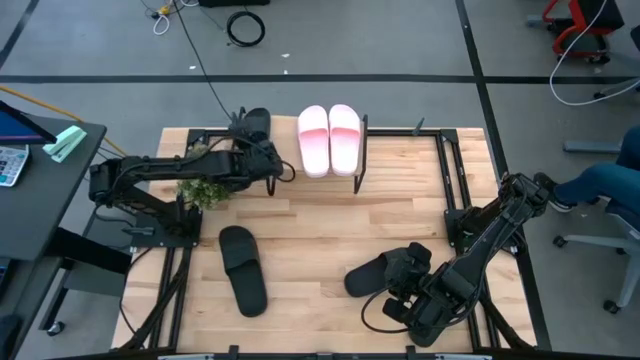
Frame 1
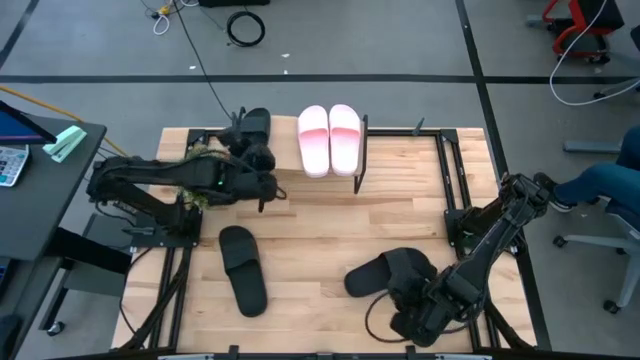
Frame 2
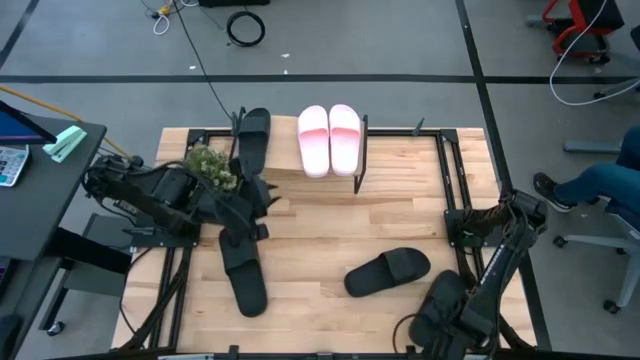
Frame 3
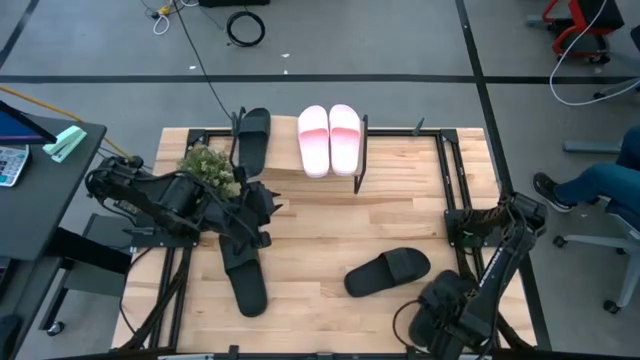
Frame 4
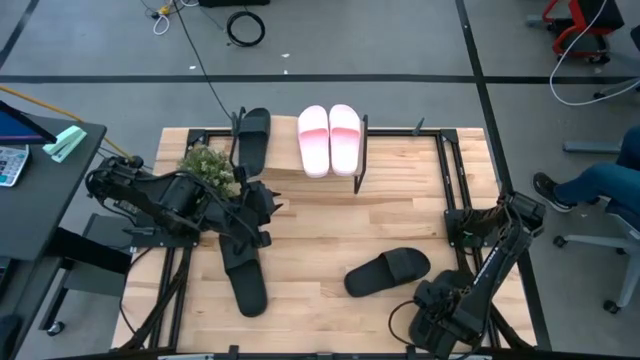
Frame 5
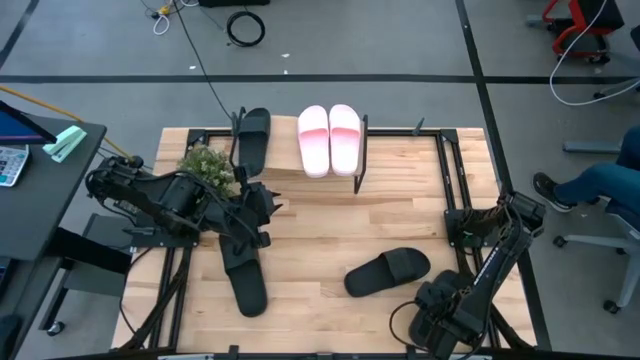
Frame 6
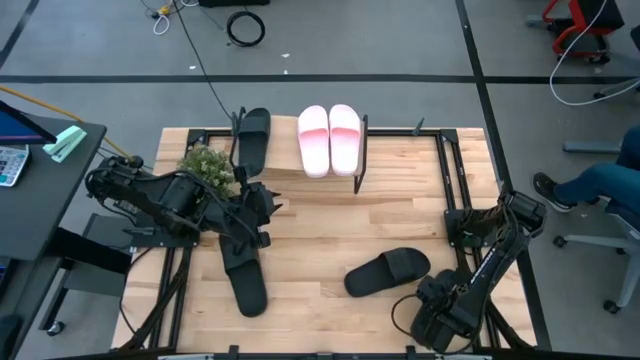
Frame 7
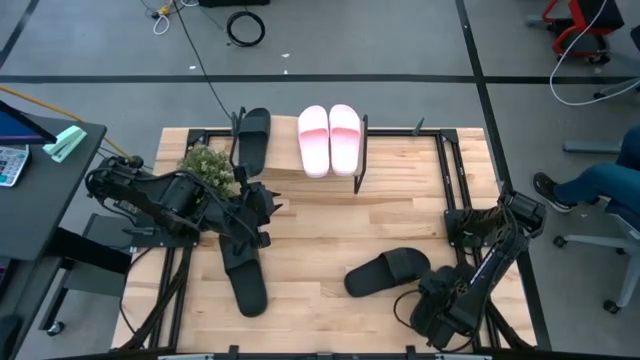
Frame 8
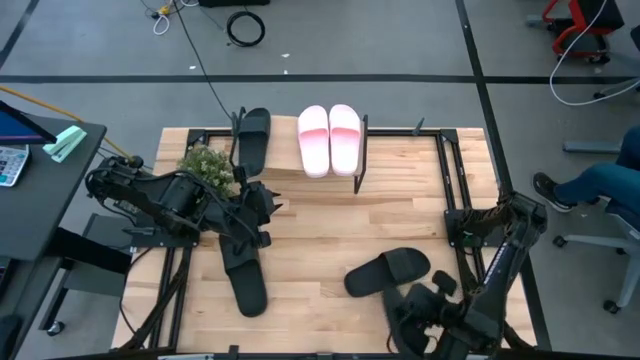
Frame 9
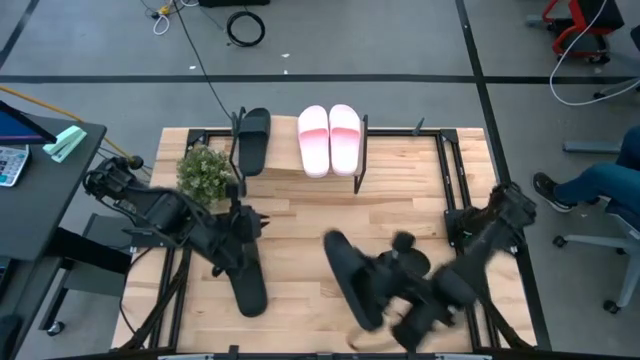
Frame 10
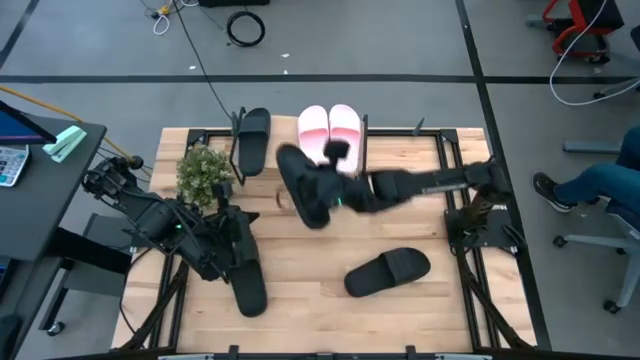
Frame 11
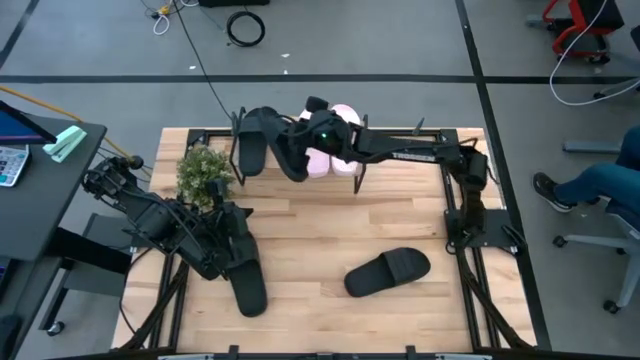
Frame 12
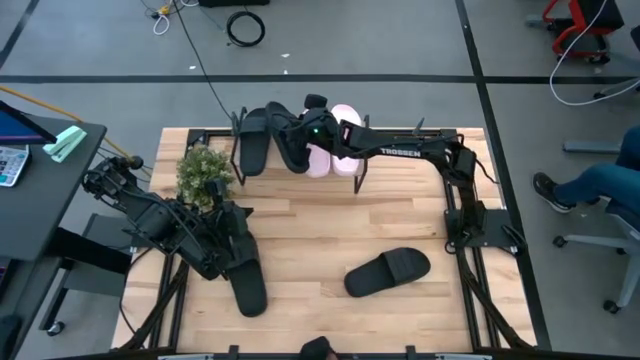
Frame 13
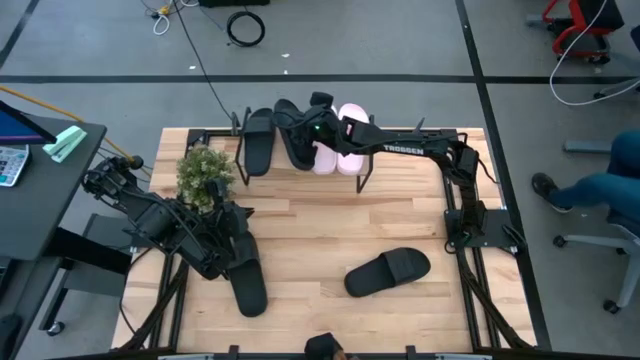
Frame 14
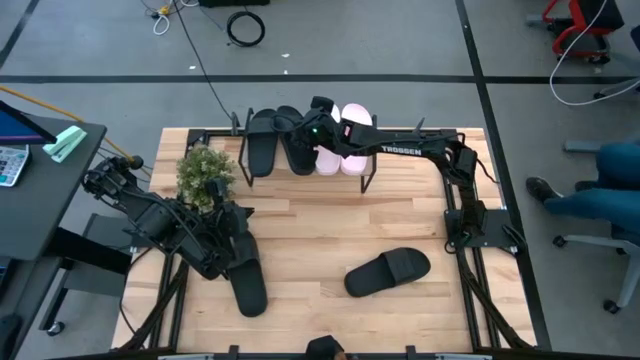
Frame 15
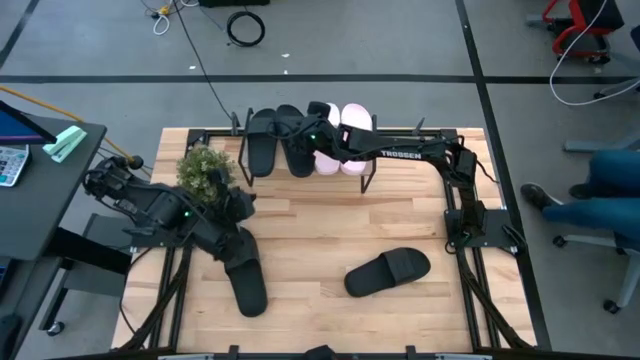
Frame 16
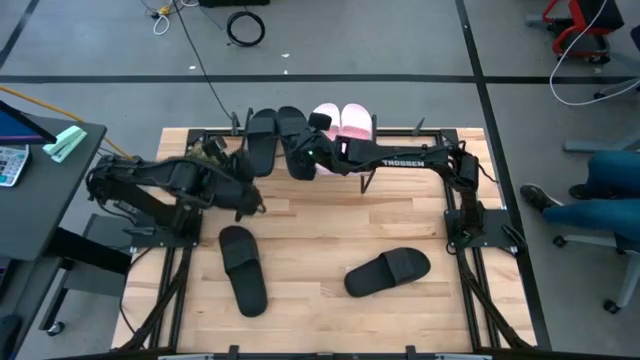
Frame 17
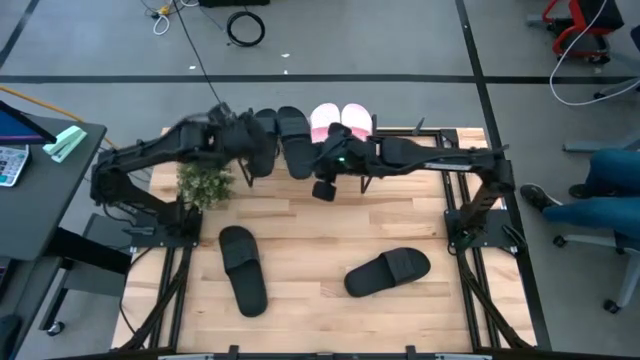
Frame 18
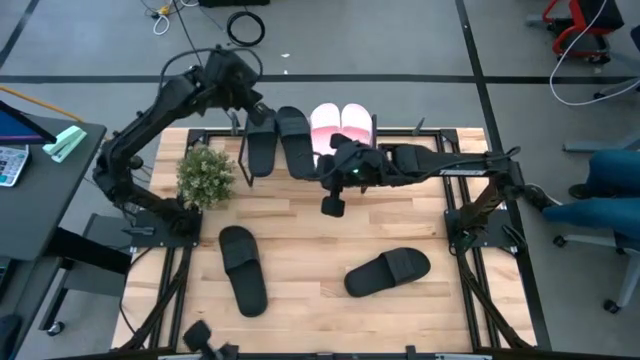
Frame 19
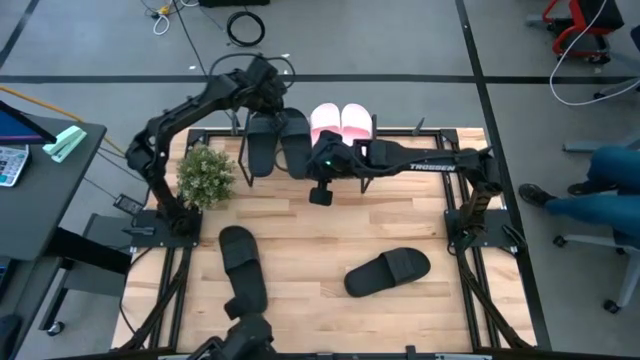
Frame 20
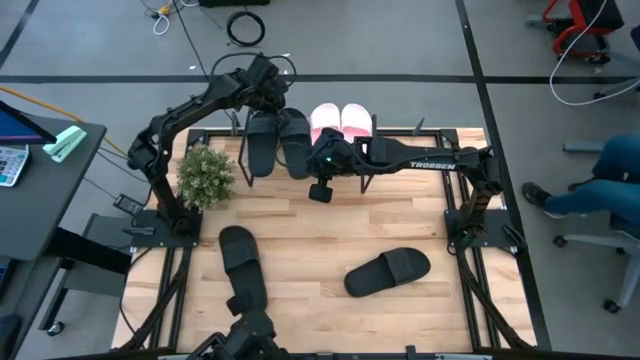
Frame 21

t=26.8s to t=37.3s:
Task: Pick and place slides into the shelf
Put the right black slide on the shelf

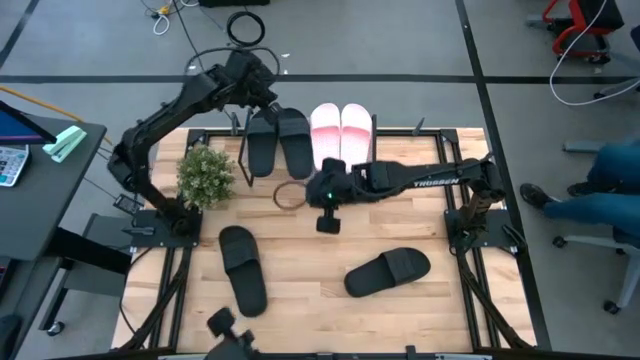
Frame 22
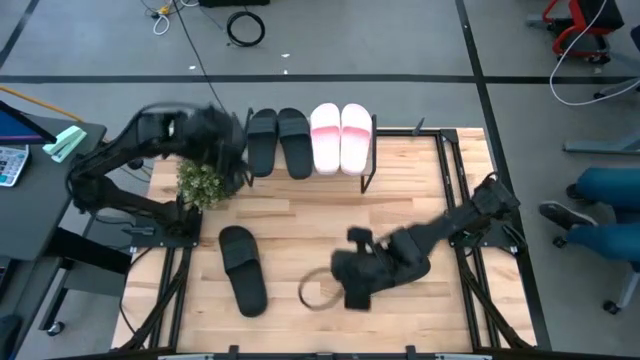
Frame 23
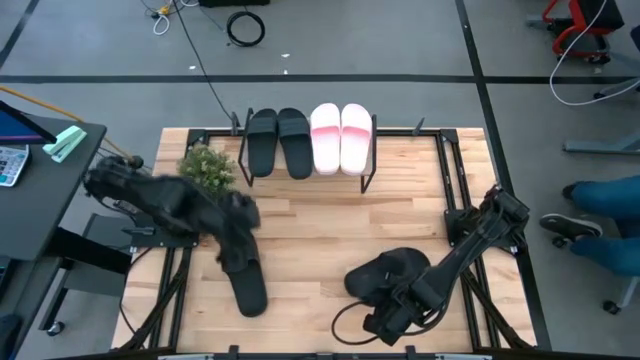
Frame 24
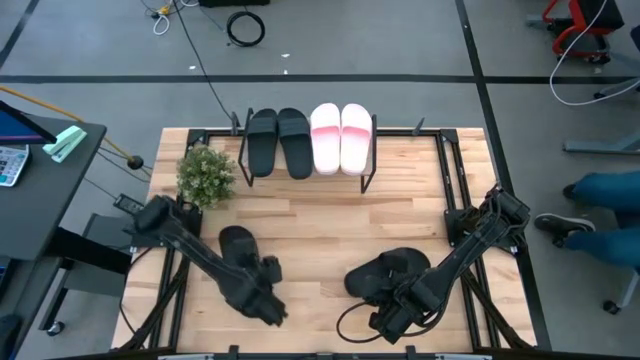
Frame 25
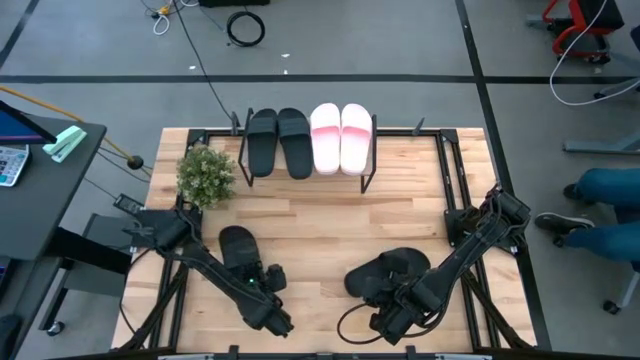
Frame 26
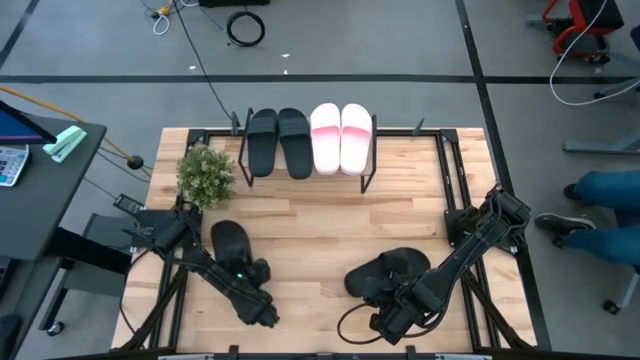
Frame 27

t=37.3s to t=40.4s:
Adjust the left black slide on the table

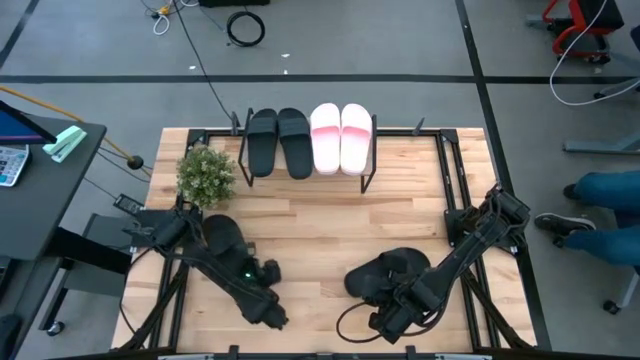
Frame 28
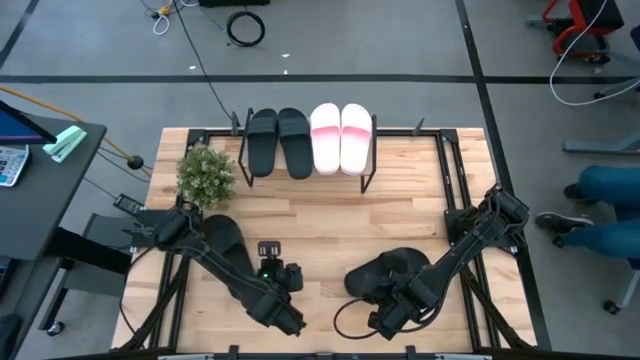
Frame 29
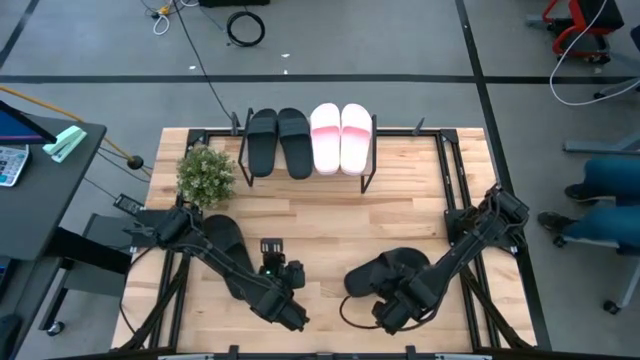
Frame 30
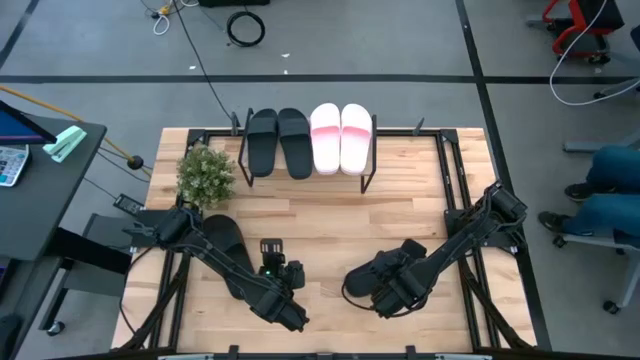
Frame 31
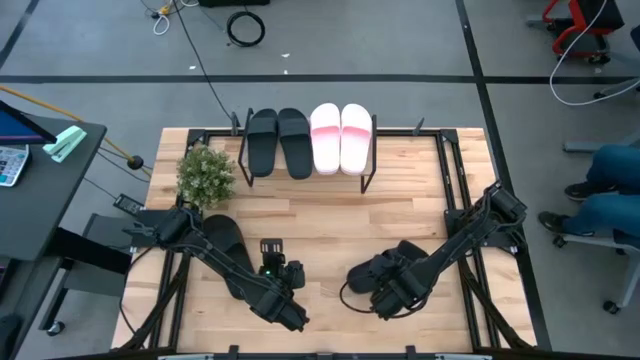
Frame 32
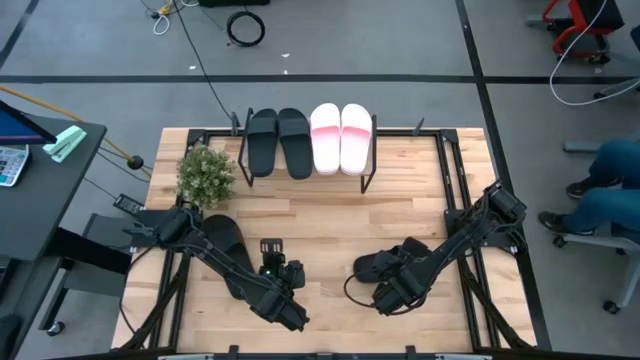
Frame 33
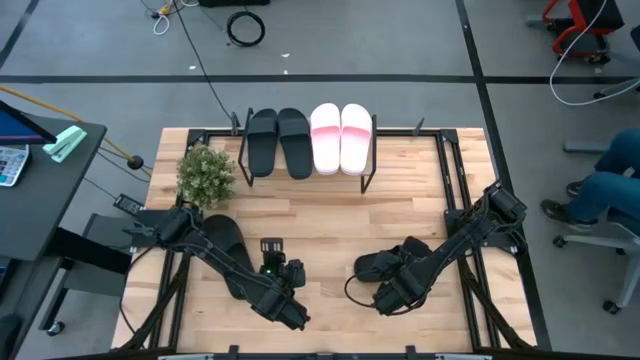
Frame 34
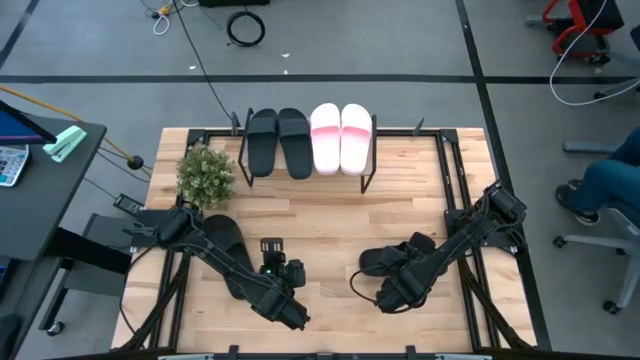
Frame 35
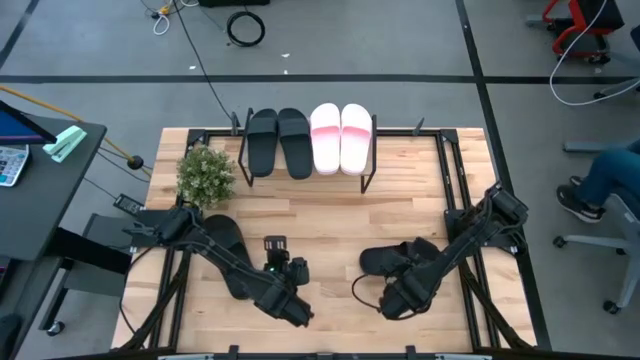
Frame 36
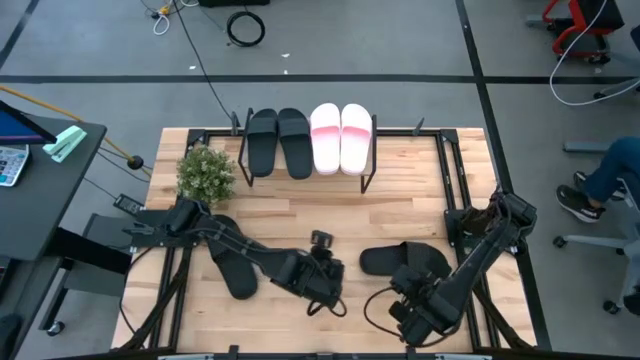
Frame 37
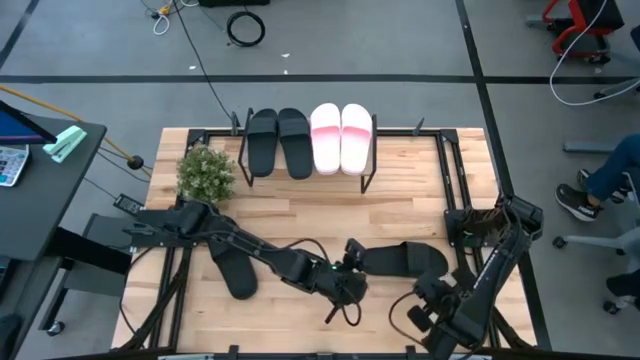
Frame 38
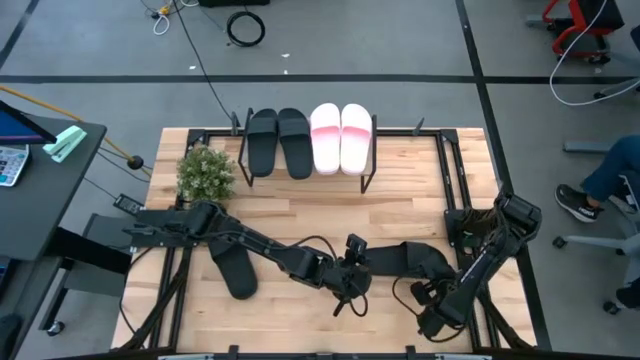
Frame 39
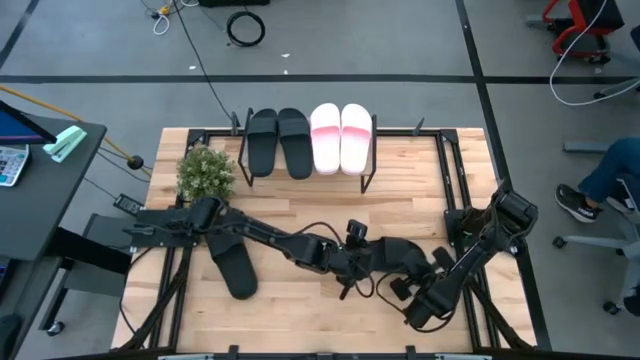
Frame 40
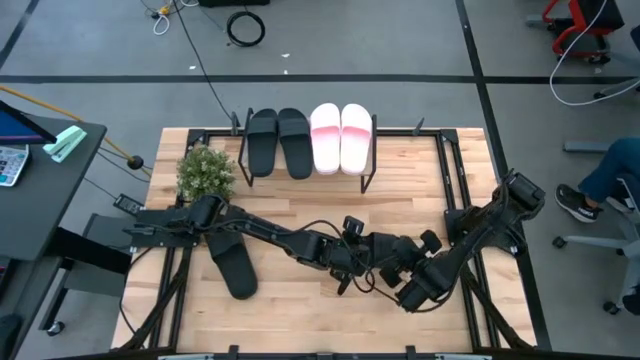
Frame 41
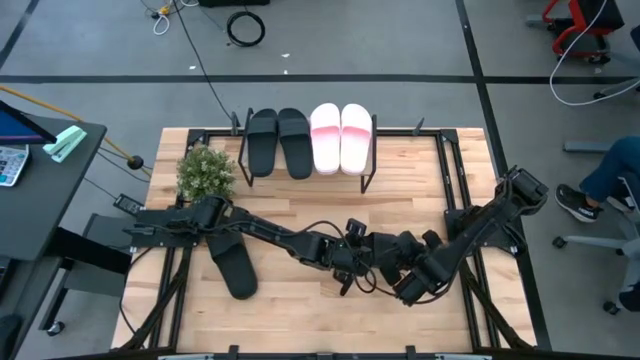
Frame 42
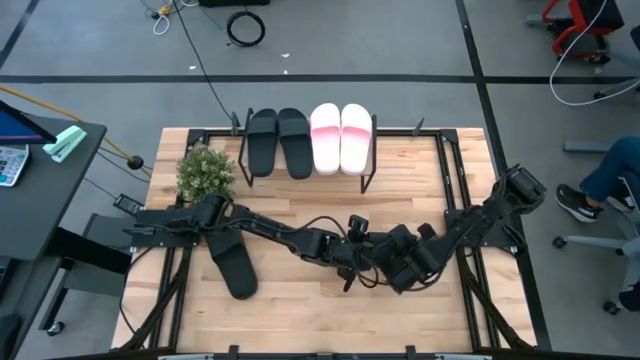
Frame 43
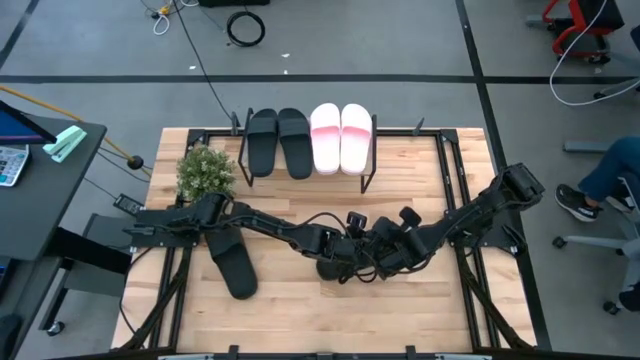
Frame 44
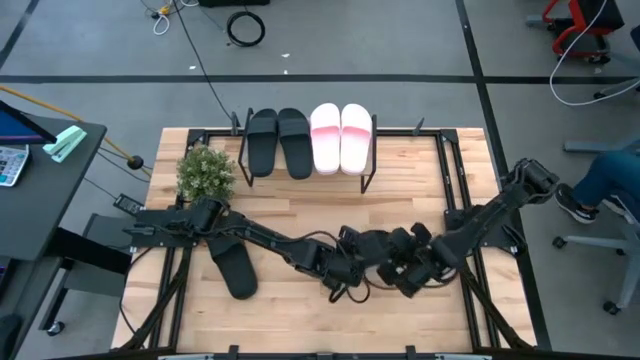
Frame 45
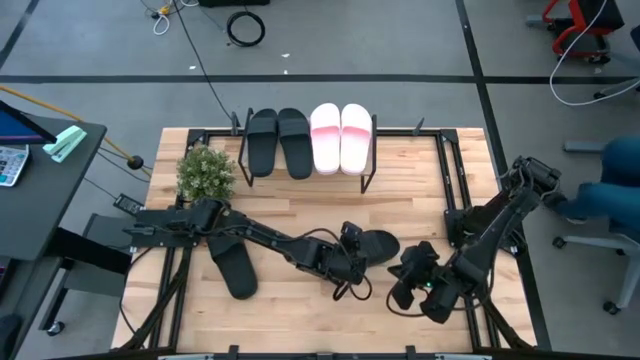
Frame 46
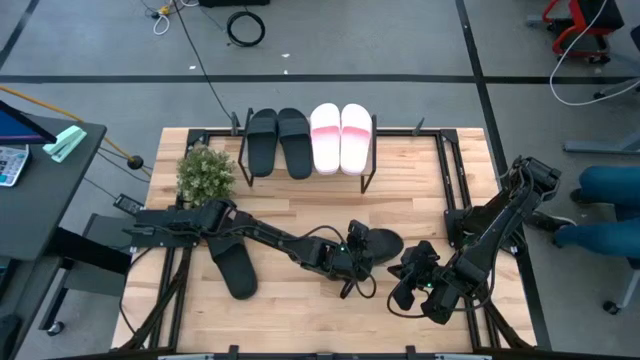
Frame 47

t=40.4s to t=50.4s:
Put the right black slide under the shelf
